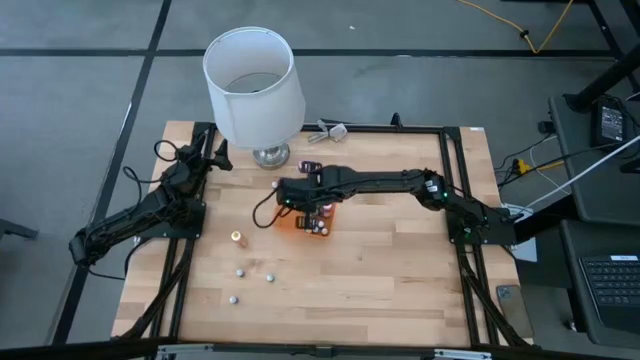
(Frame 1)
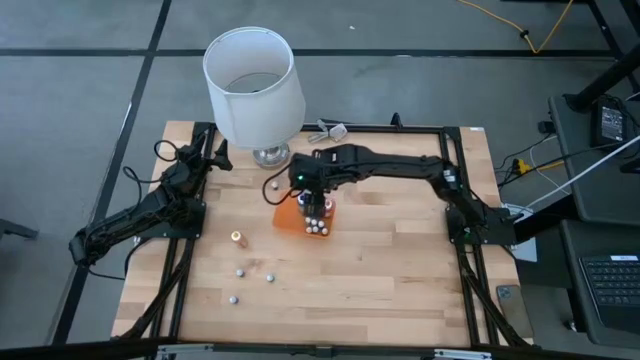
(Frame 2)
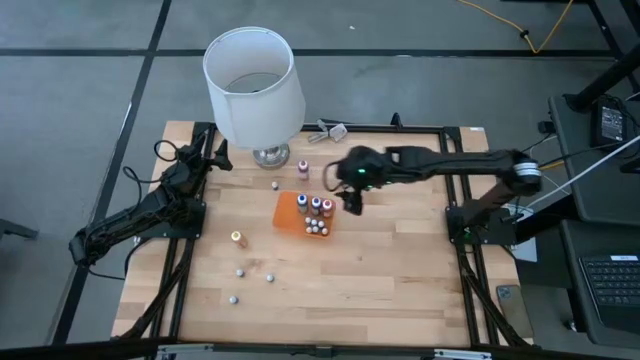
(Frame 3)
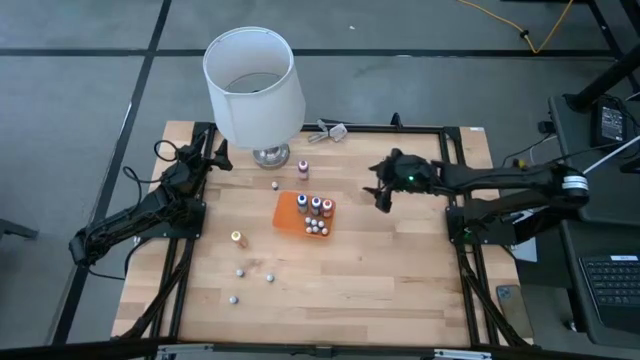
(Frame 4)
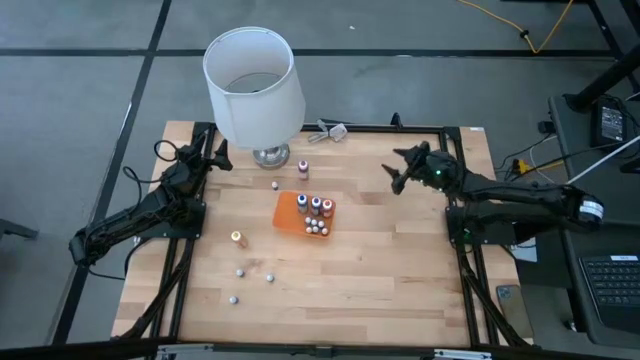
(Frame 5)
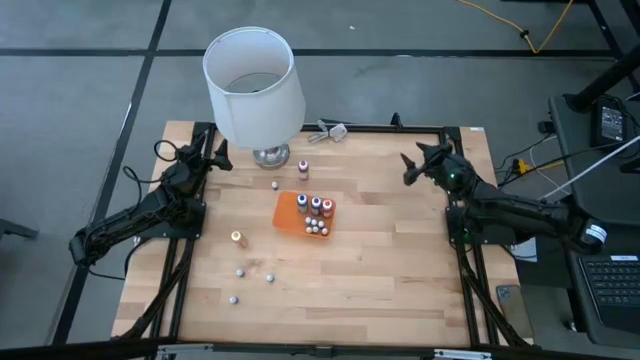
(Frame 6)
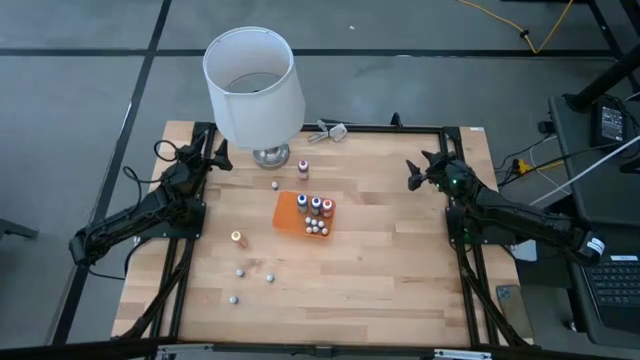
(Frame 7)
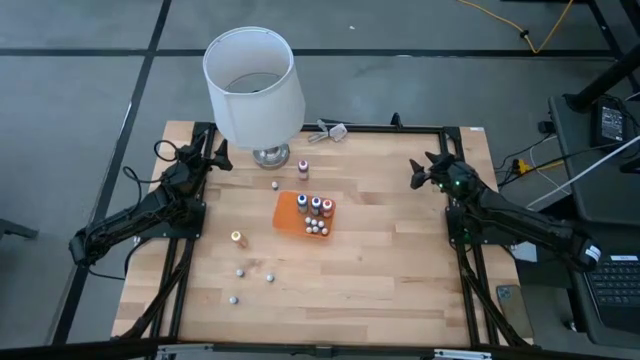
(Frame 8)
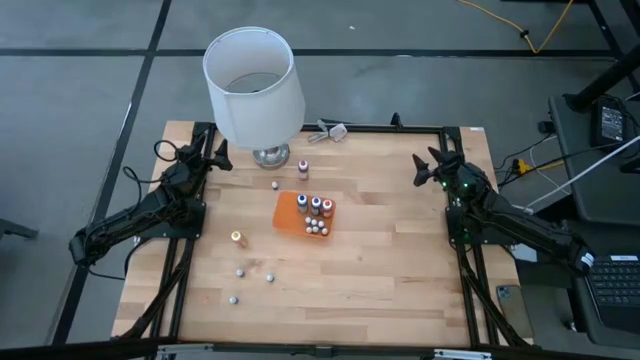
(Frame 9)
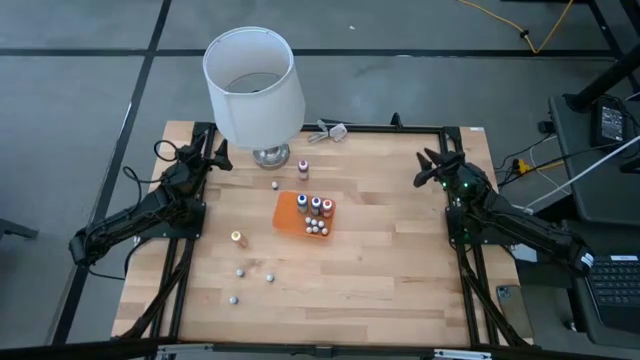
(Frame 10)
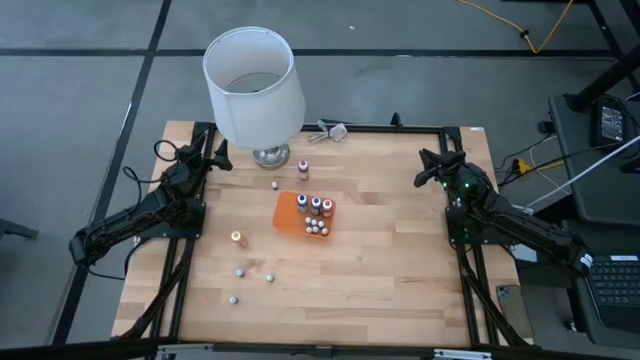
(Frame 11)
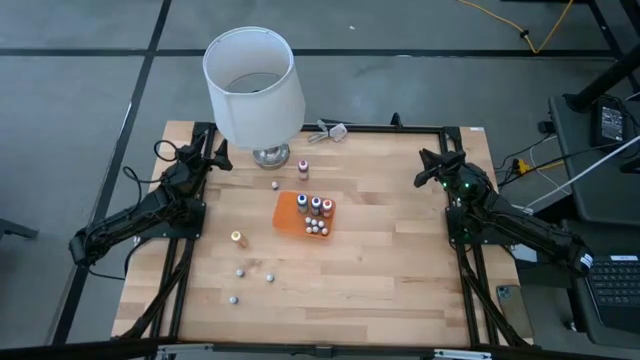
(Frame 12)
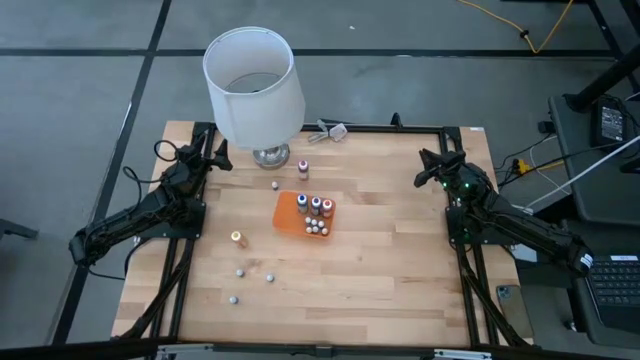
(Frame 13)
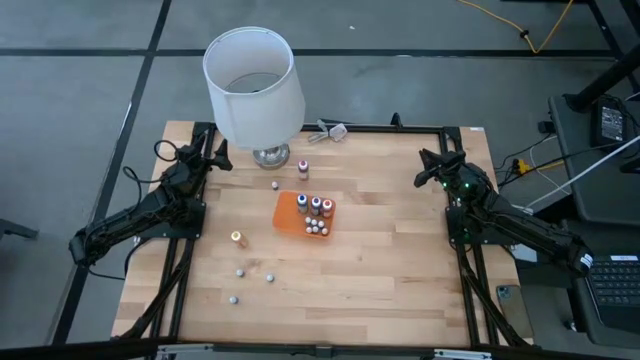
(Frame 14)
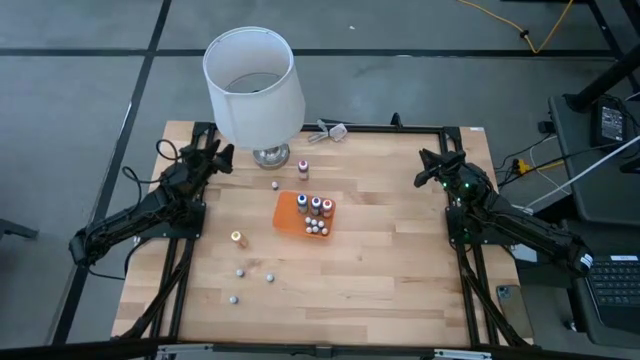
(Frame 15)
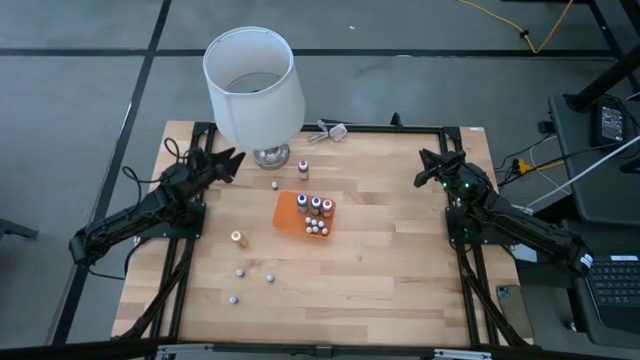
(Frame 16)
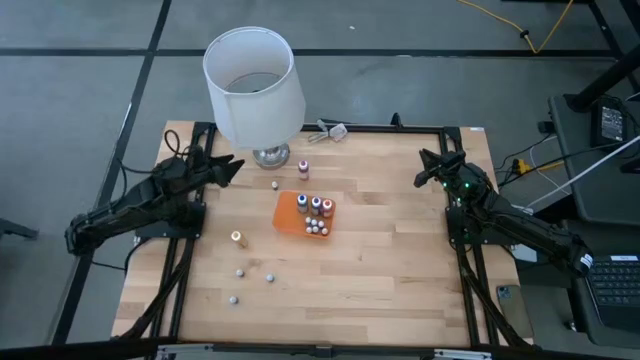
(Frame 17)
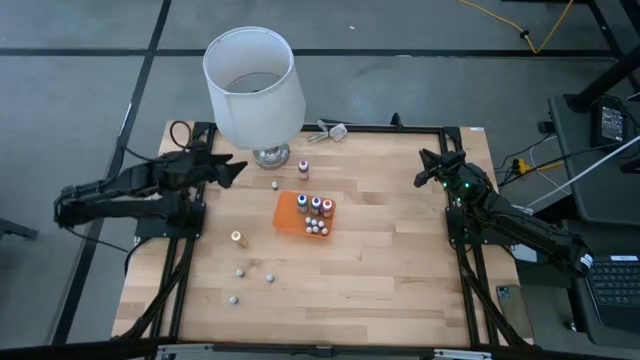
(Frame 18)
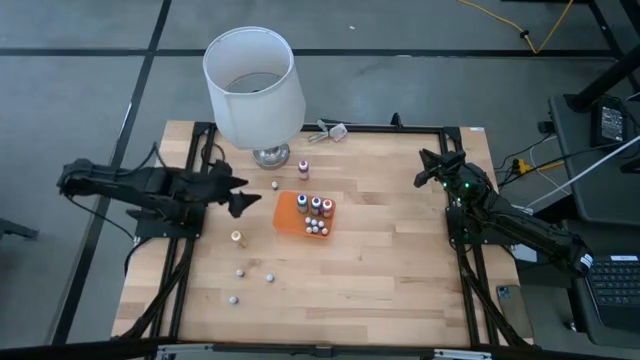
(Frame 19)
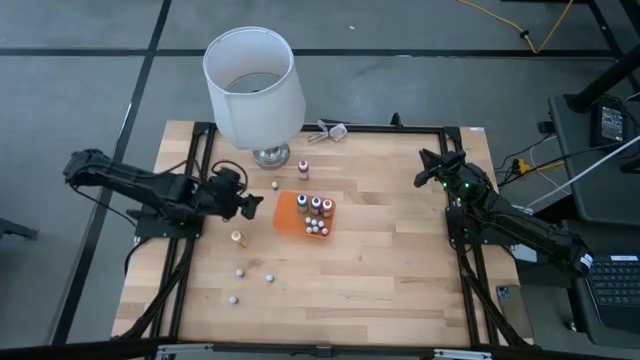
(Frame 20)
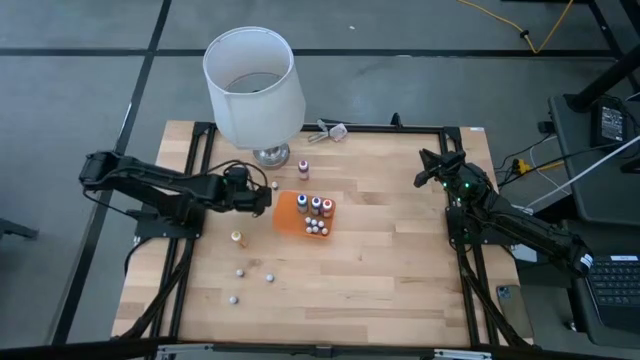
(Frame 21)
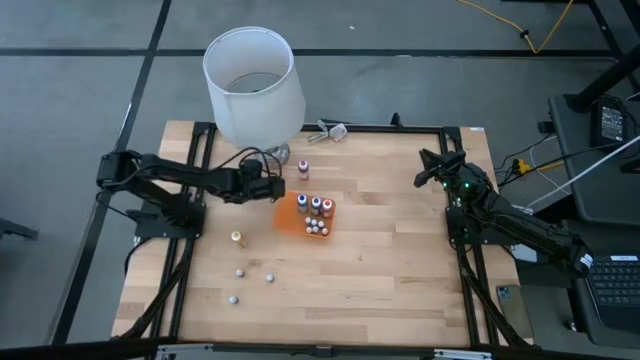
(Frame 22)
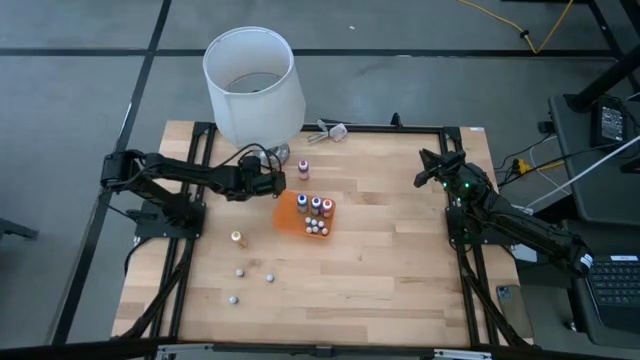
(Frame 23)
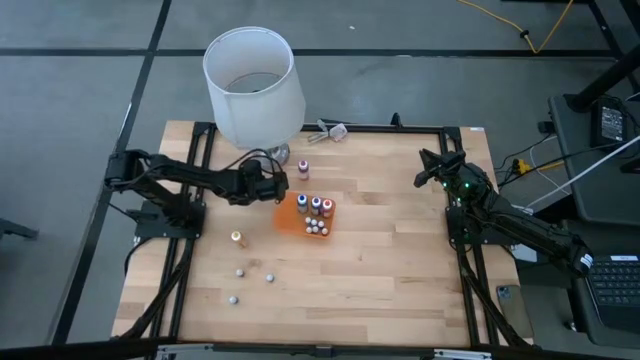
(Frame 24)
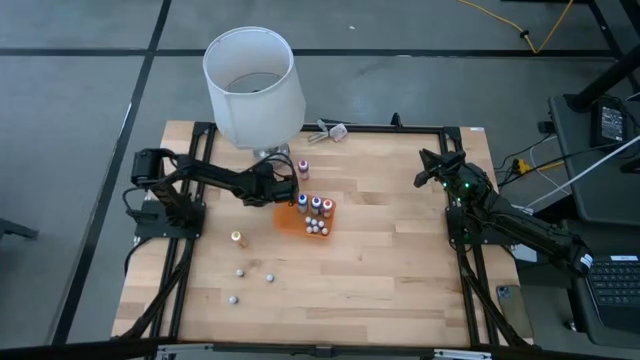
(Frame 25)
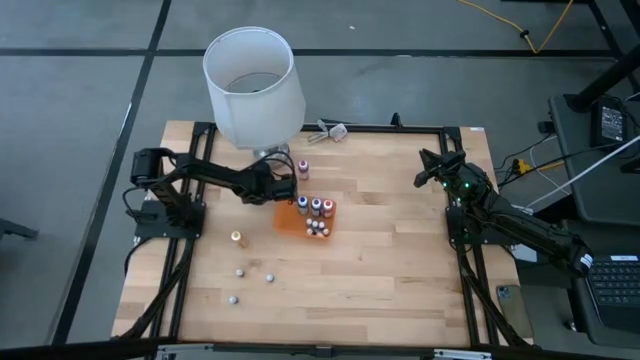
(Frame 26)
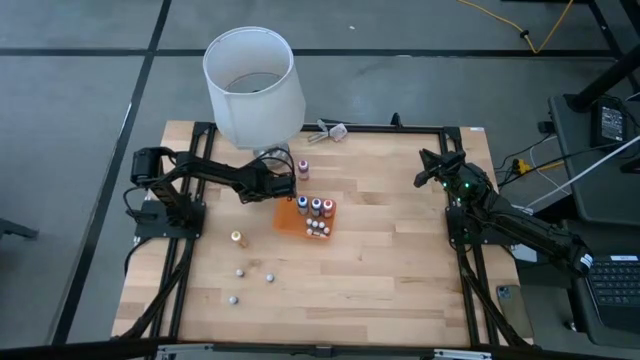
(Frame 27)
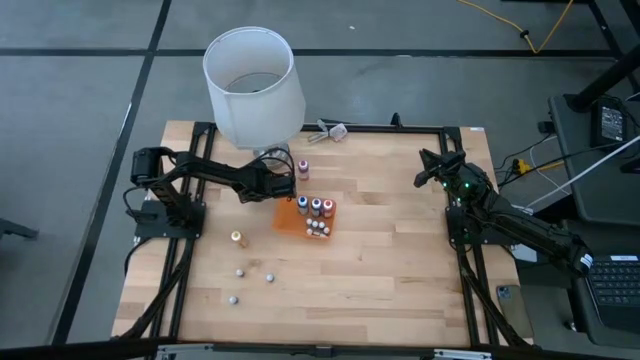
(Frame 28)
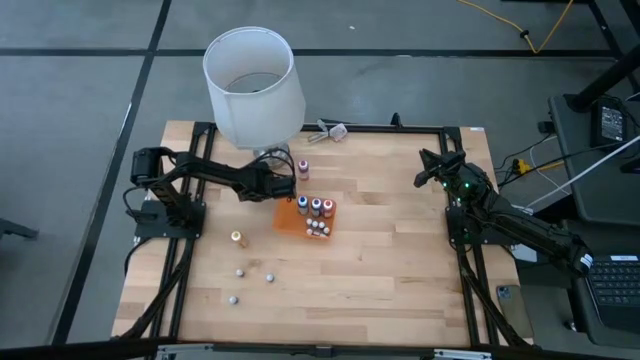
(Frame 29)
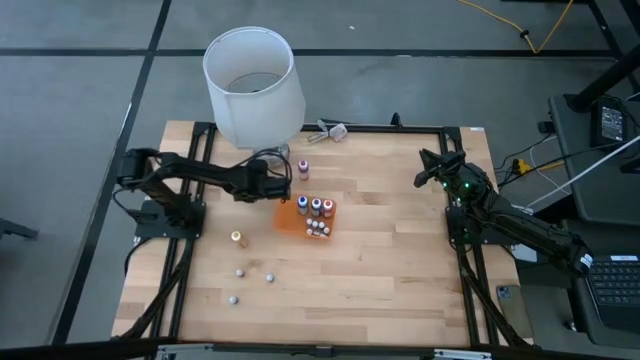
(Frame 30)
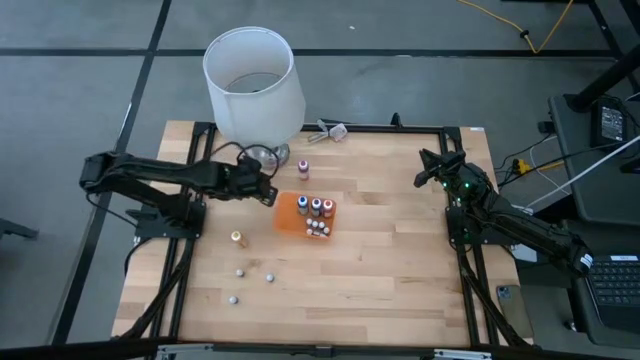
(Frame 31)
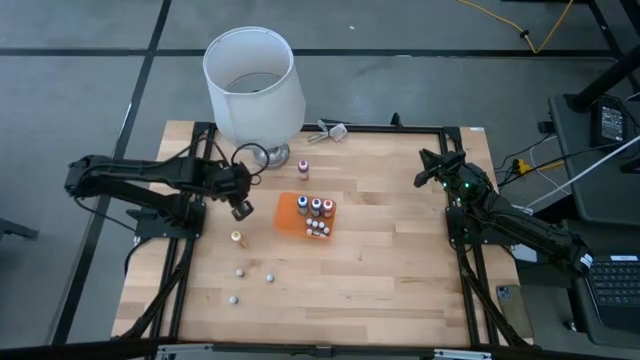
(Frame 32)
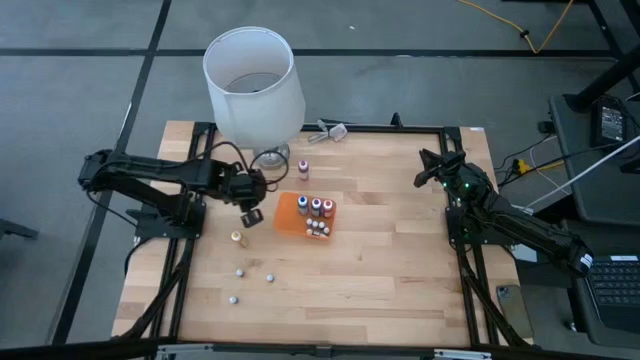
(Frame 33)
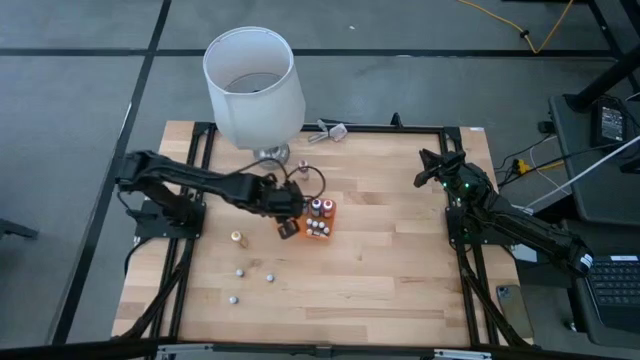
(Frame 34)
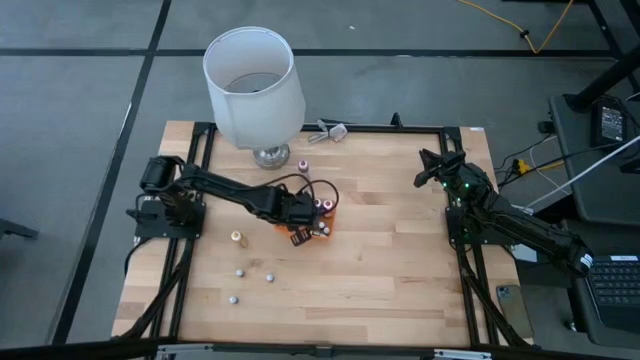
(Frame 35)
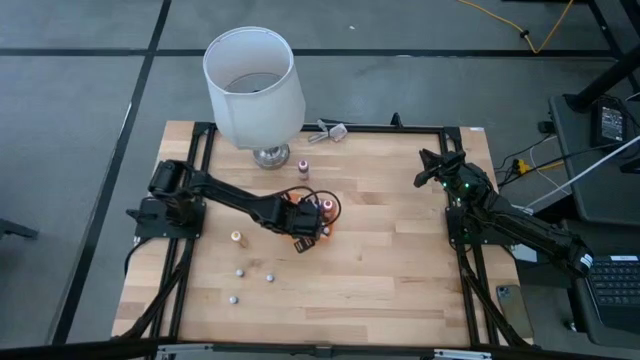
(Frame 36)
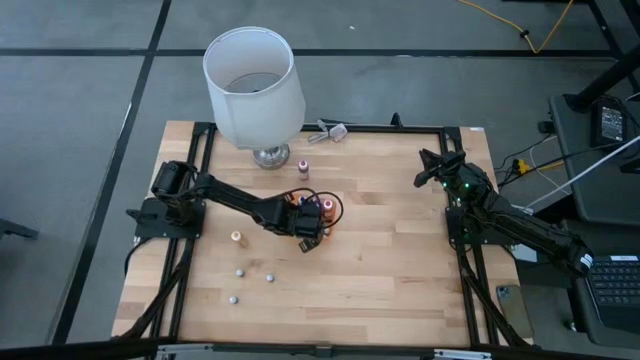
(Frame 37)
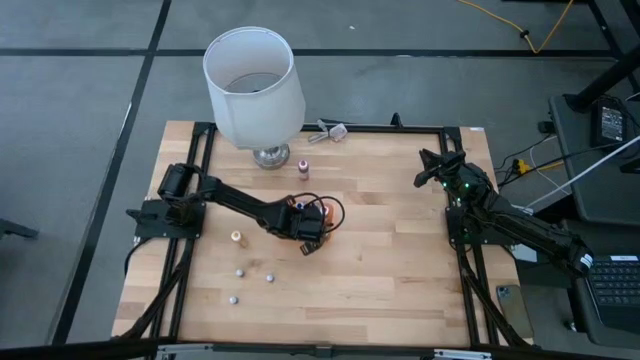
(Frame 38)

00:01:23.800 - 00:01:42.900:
Task: Pick & Place food coloring
Put the small red food coloring bottle into the orange bin

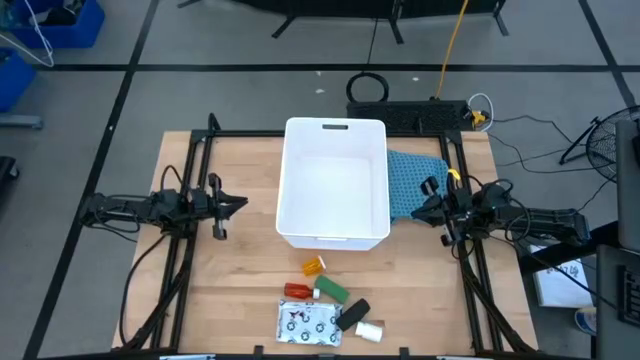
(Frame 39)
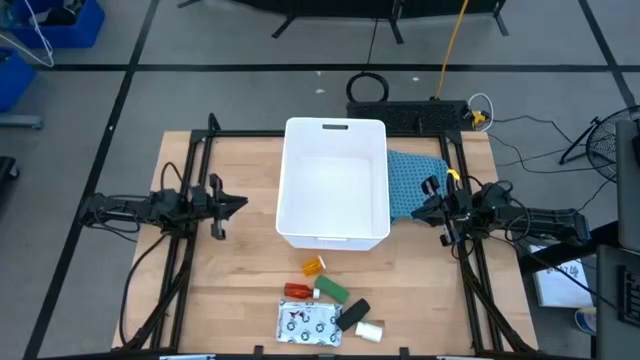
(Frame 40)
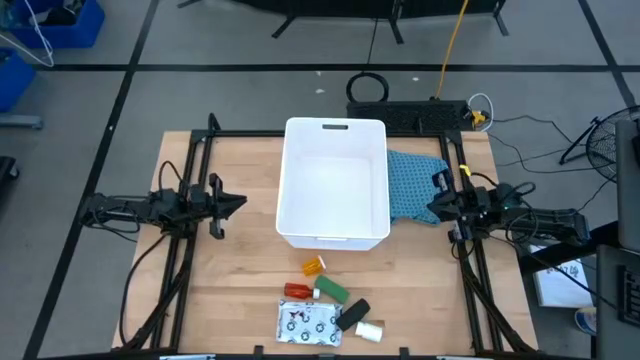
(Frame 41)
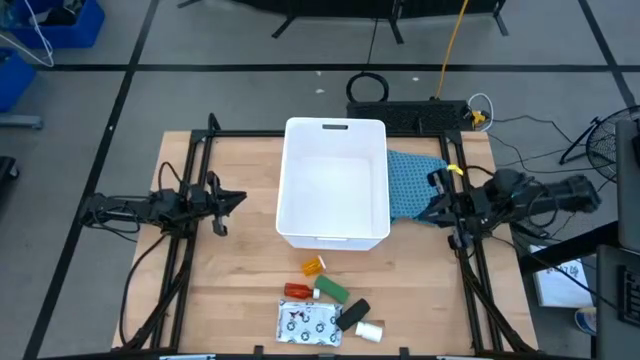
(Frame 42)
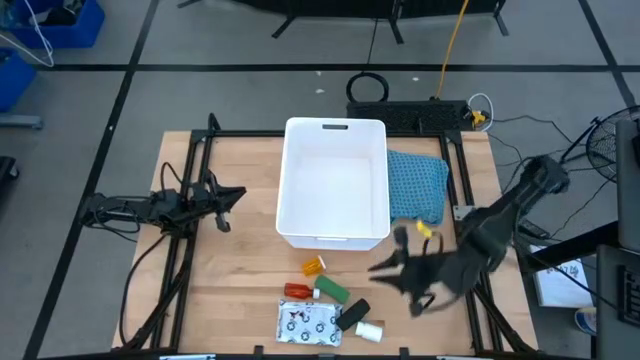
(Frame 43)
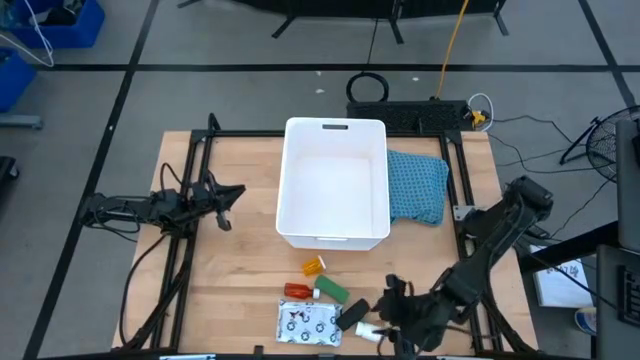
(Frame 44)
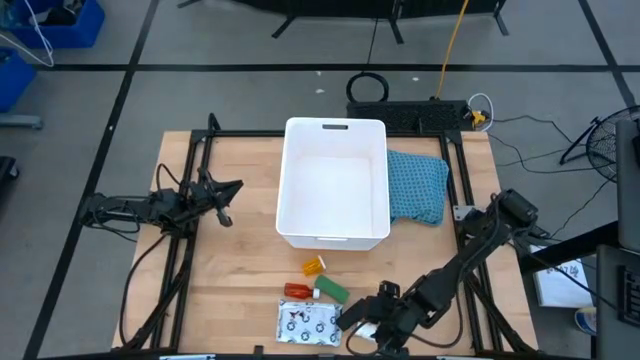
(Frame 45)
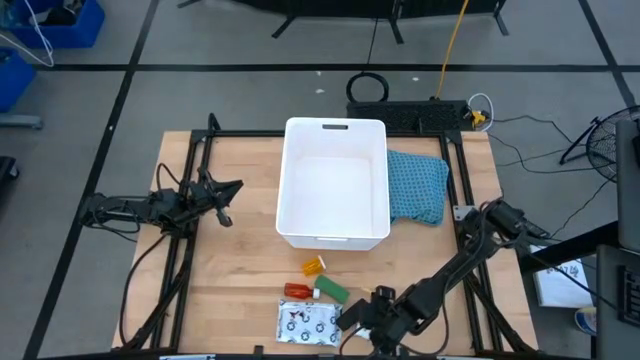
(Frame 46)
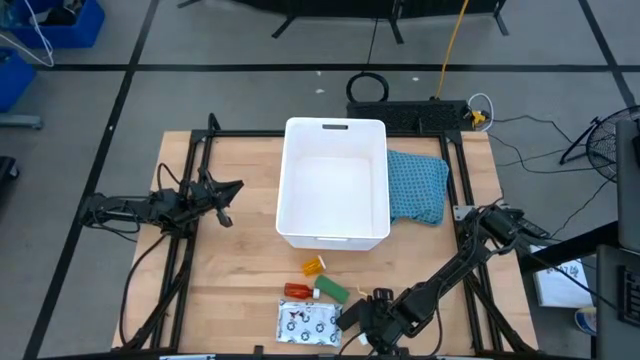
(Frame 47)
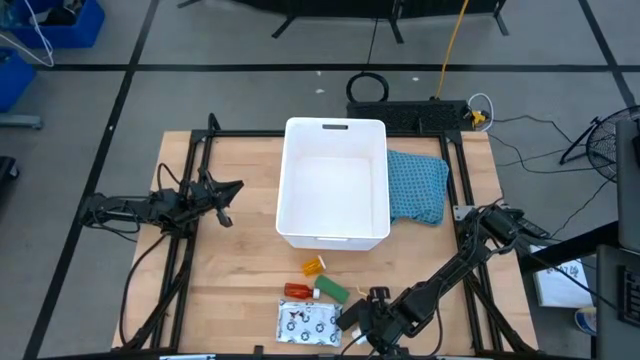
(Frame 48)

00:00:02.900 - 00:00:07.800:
Task: Pick & place medical supplies in basket/bin
Put the white pill bottle into the white bin
